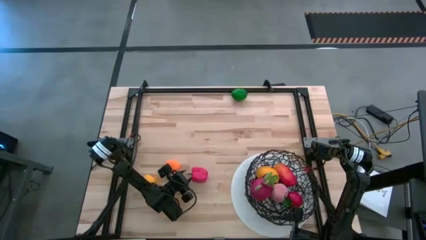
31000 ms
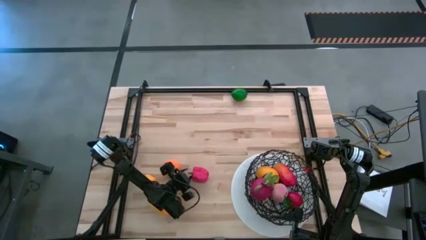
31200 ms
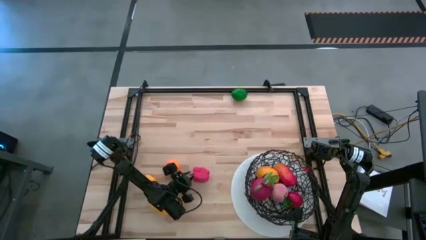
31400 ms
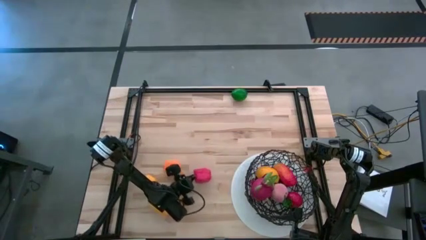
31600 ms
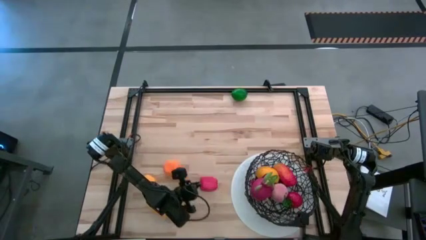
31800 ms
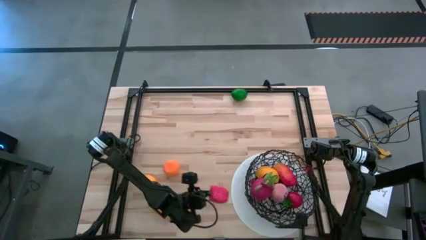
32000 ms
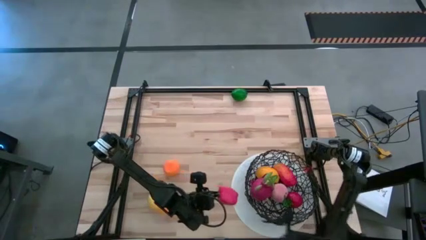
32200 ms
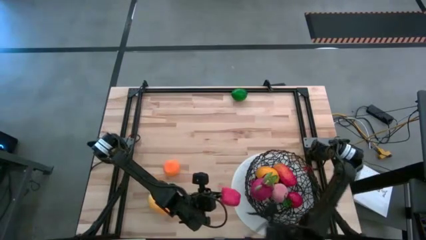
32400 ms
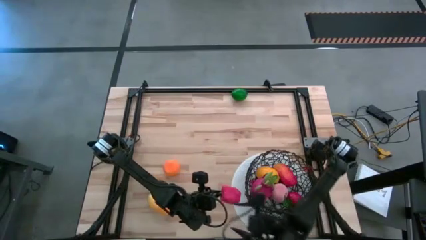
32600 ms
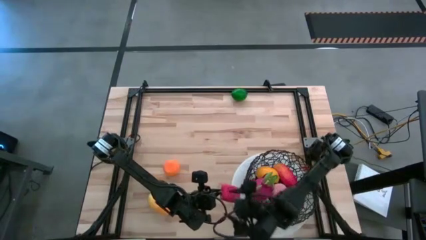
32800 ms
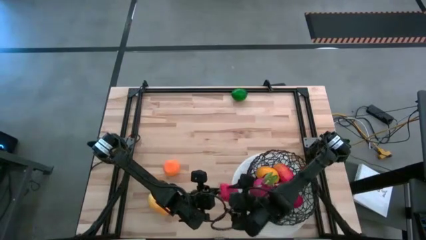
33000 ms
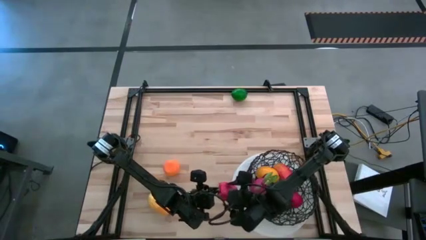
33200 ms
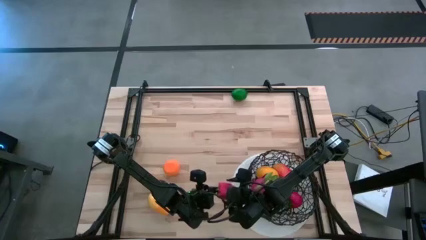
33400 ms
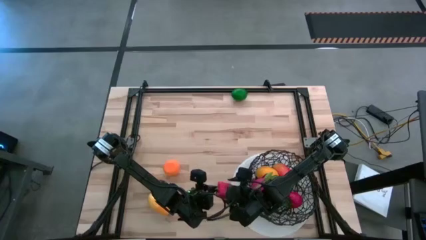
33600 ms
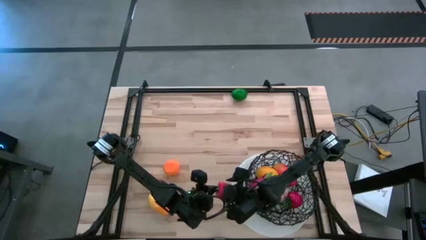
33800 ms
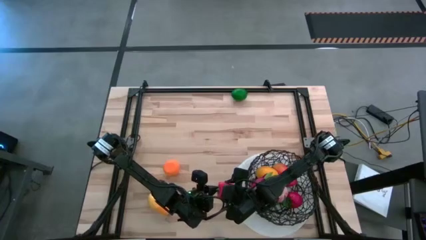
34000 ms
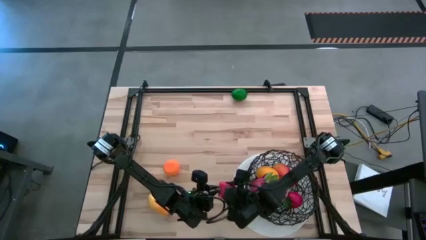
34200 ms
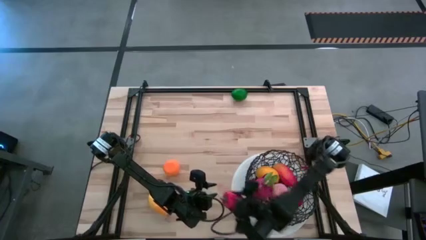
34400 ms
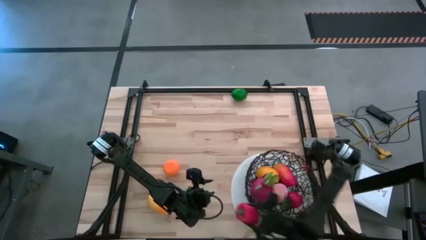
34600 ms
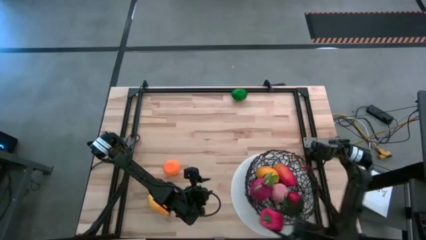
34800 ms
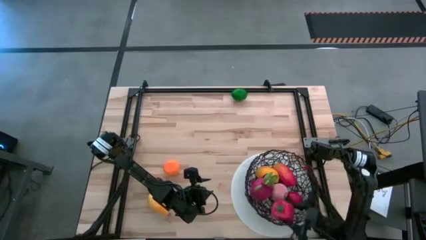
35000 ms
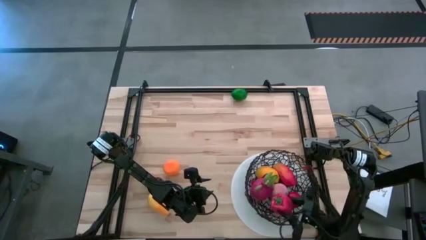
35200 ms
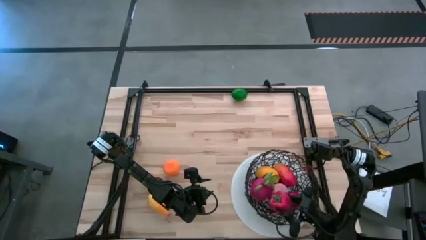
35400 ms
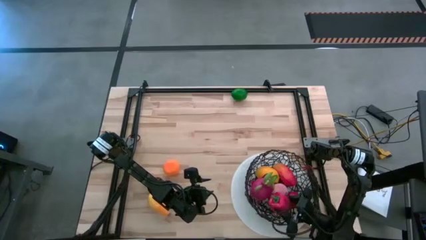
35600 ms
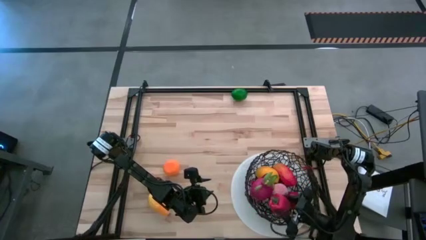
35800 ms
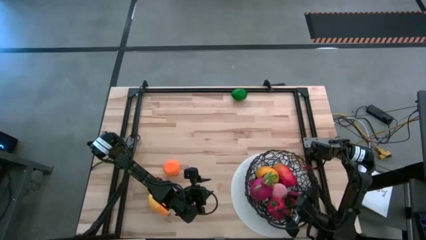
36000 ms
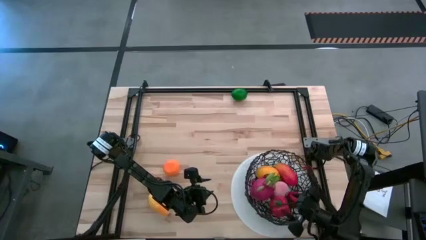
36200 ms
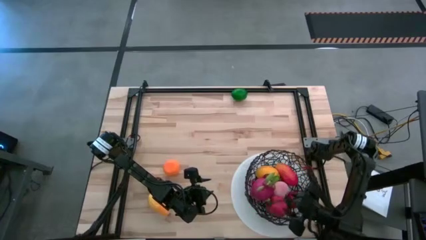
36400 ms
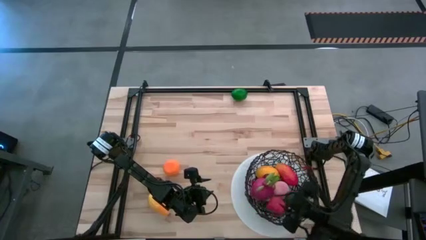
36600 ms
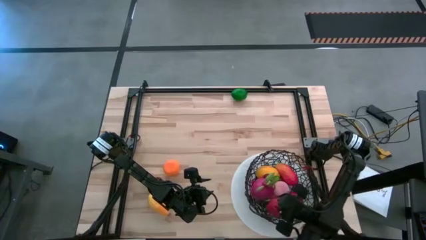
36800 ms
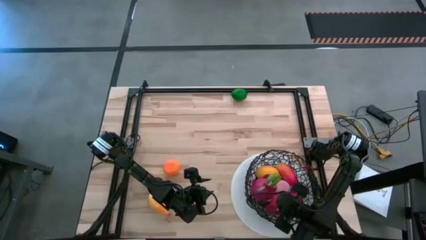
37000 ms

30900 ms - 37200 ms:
Task: Build produce basket
Put the red bell pepper into the black wire basket

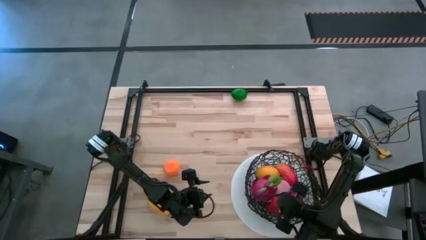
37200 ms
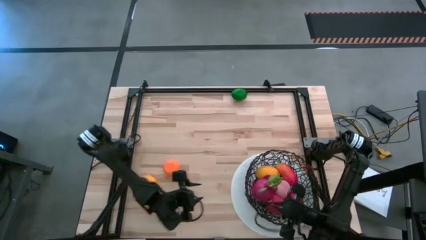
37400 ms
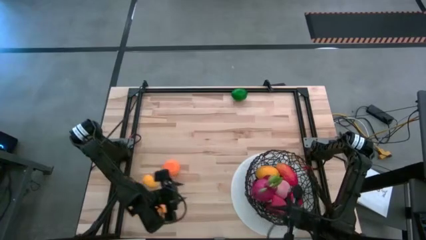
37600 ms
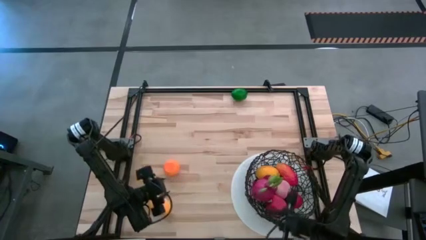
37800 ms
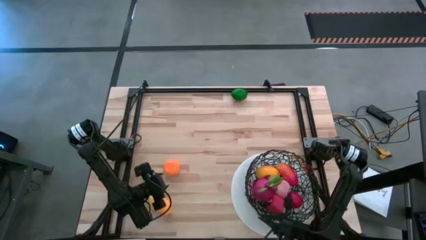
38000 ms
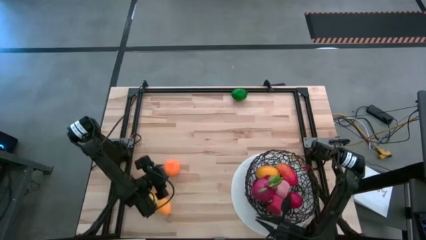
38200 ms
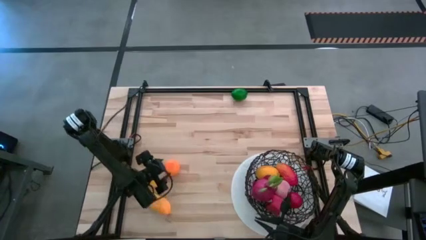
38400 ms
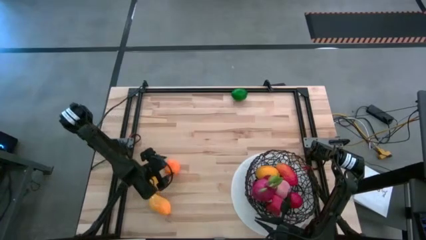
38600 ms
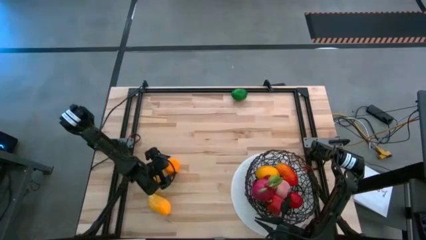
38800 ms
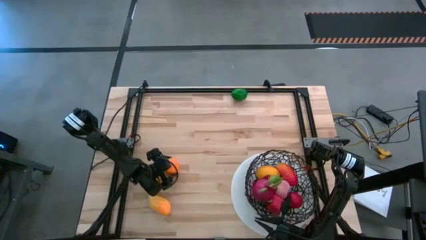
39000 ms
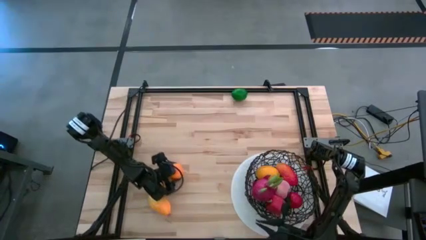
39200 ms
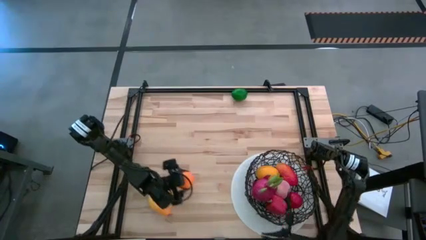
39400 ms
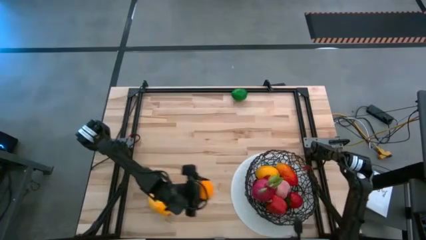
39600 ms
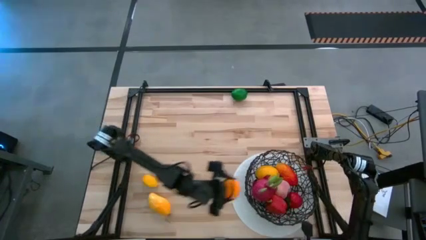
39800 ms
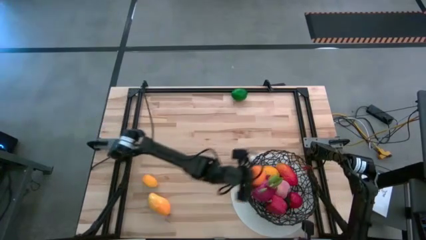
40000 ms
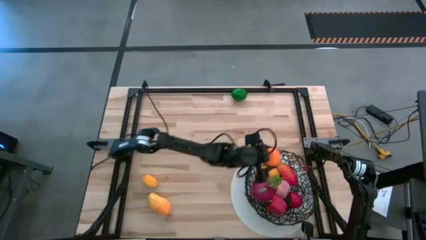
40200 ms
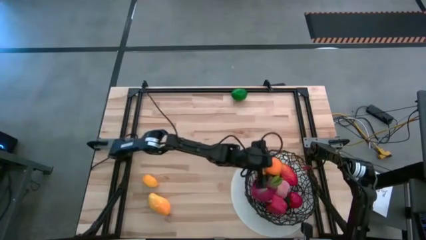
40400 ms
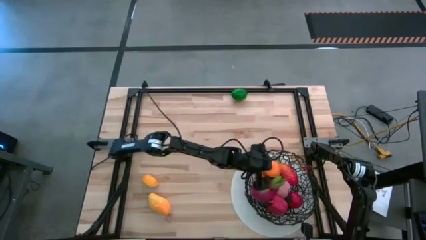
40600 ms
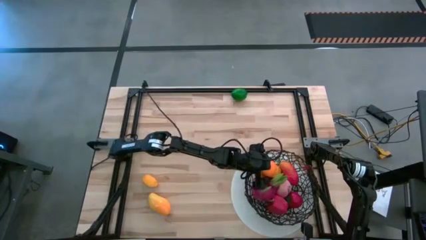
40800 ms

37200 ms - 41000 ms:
Put the orange into the black wire basket

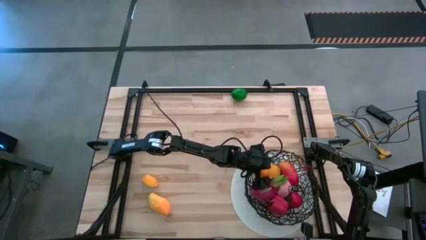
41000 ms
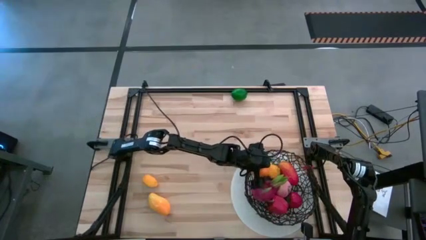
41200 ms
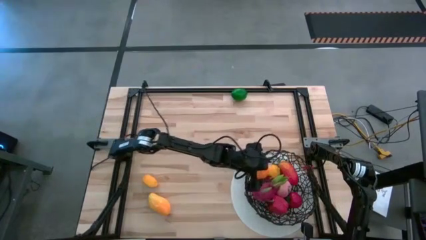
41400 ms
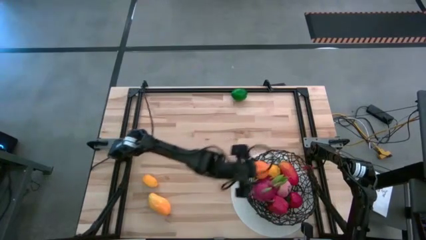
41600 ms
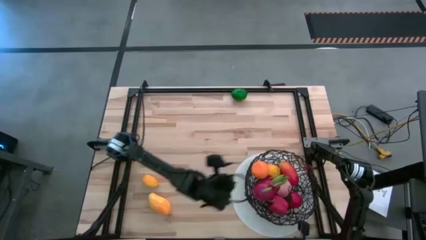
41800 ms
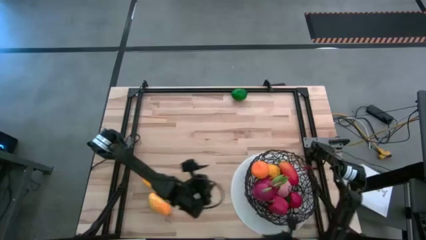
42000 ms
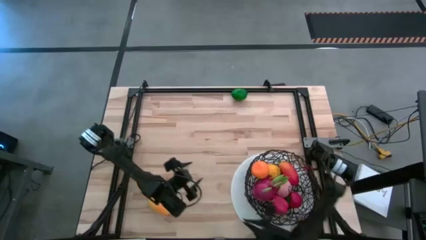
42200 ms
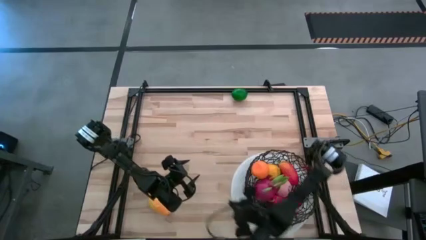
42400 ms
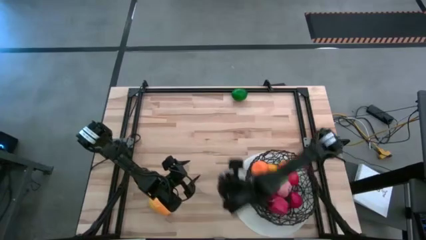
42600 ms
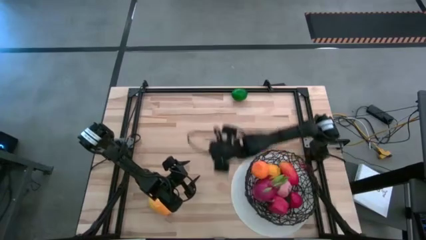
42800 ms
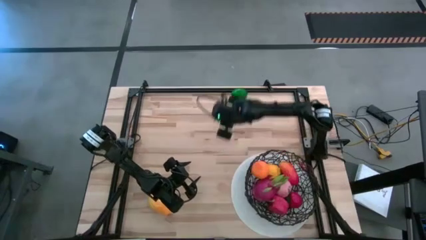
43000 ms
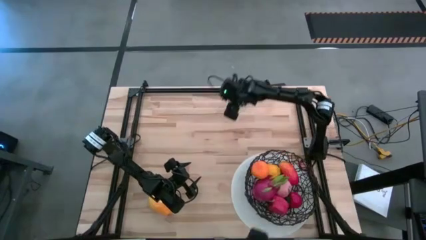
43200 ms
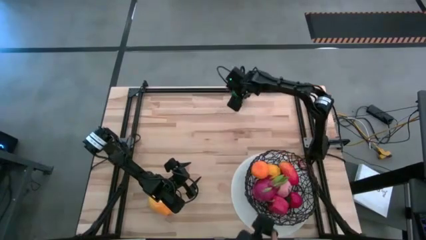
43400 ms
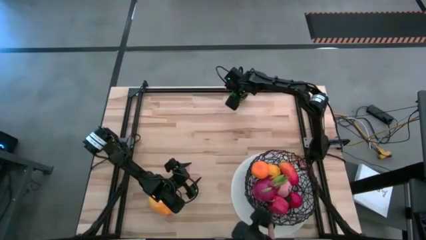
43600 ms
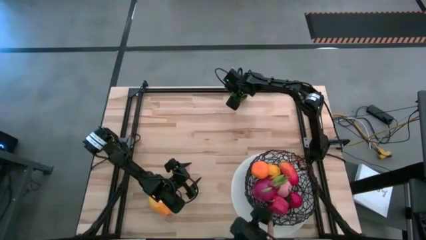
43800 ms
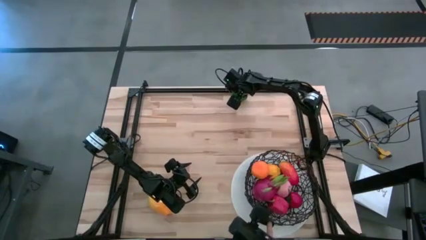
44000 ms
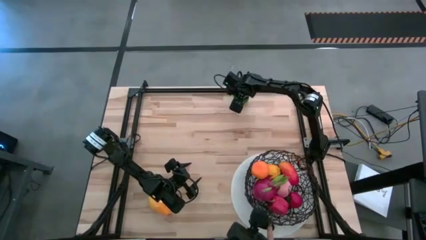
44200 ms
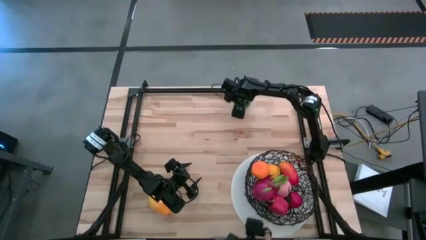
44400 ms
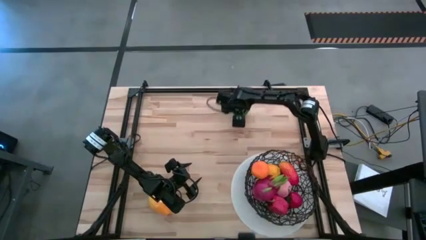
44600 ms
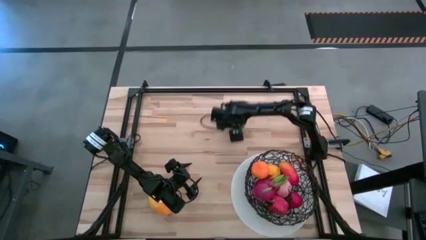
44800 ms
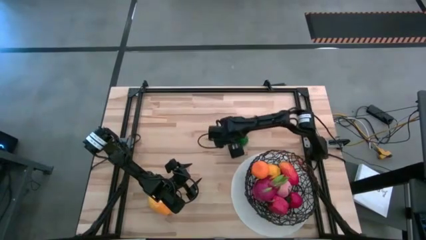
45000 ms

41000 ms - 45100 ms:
Put the green lime into the black wire basket

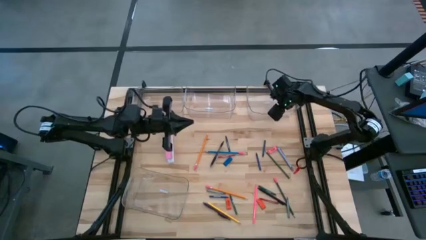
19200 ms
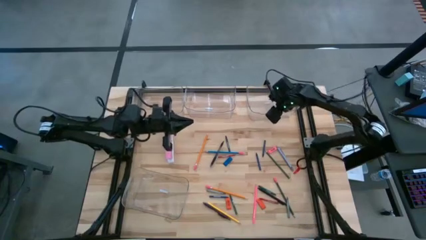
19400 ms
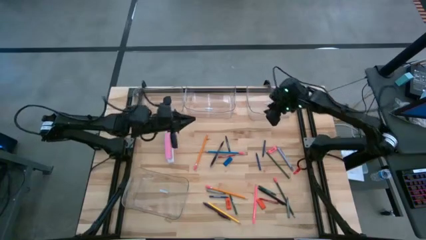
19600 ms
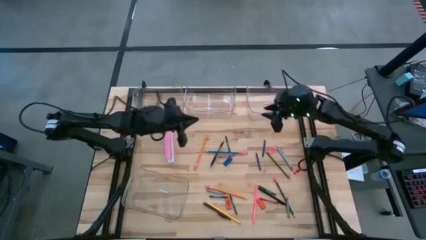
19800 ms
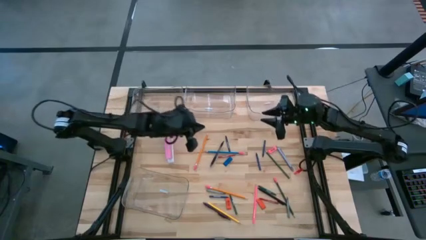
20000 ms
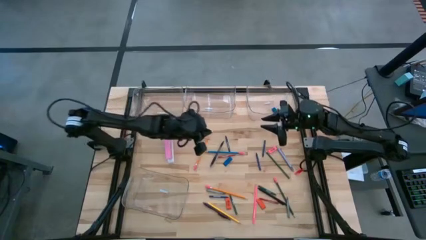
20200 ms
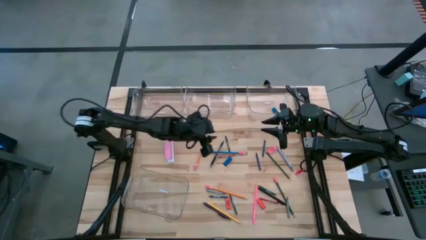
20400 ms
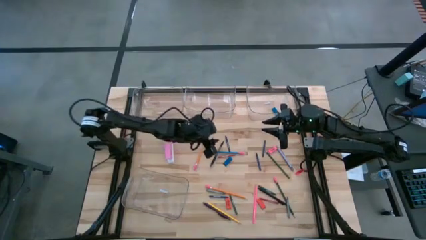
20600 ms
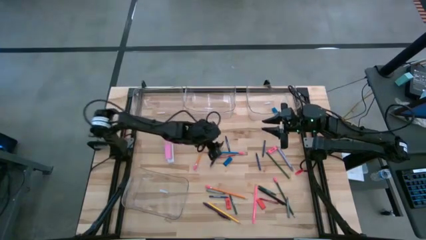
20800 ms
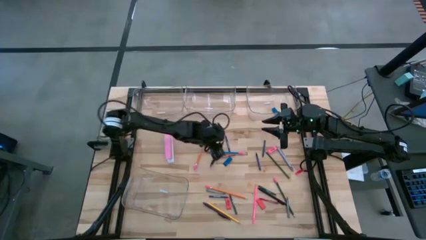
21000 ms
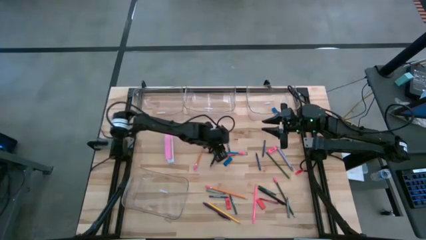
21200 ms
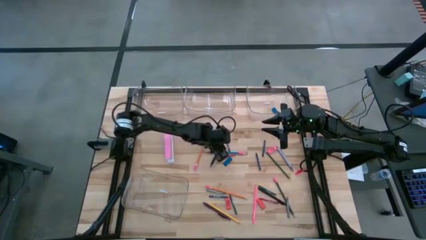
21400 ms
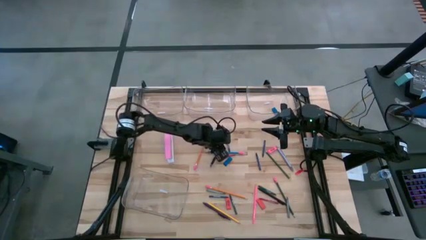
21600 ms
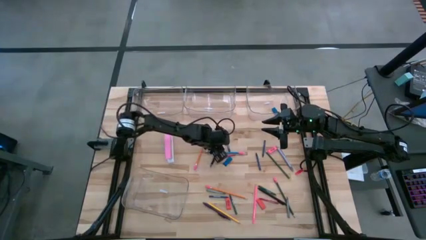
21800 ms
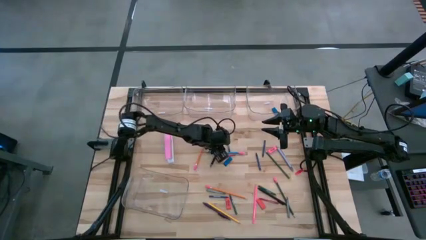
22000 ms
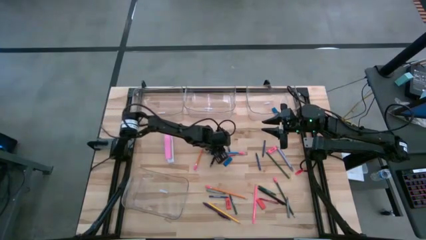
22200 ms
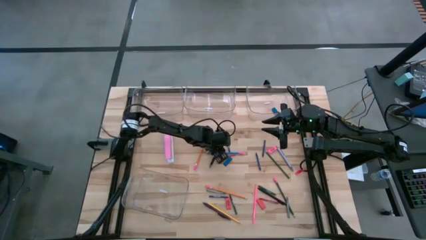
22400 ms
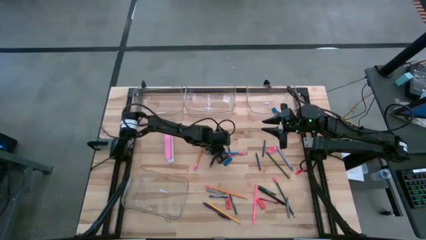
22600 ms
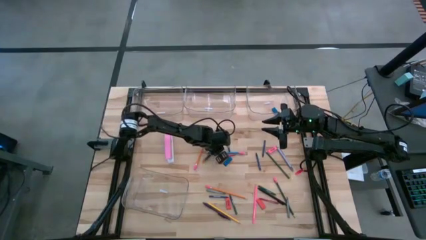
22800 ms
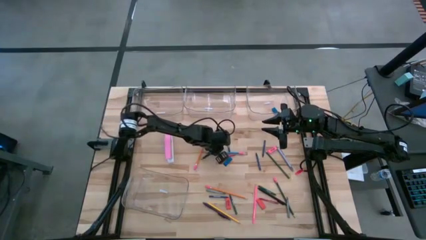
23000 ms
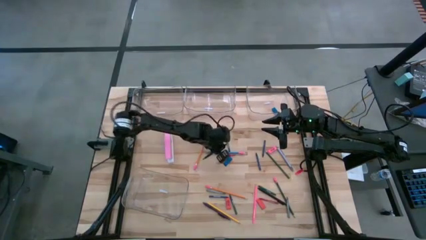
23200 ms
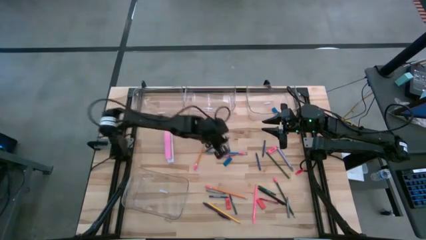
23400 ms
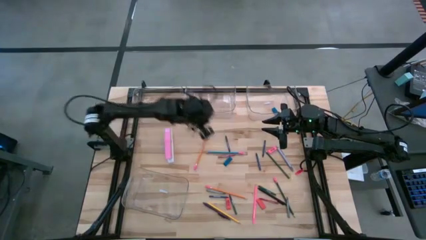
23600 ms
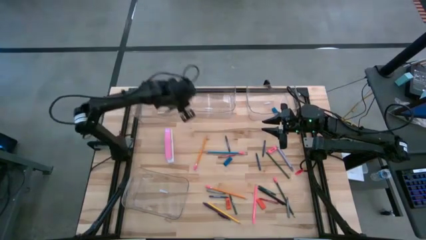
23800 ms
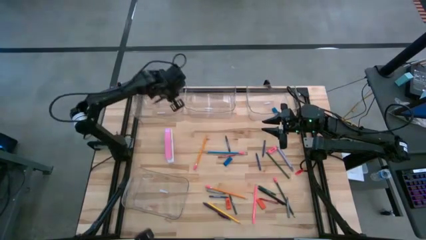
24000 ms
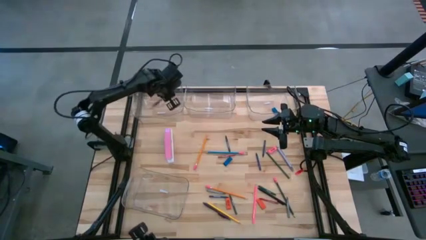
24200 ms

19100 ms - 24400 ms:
Task: Sort crayons/erasers/pens/pencils in bins
Put the black pen into the top left transparent bin
